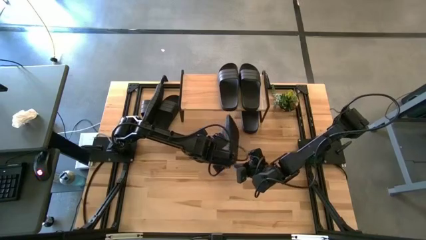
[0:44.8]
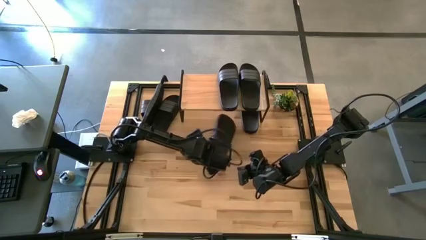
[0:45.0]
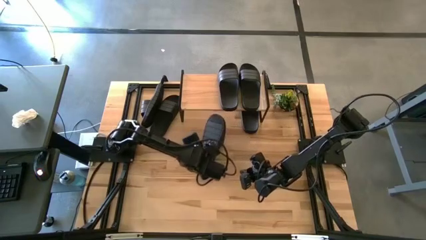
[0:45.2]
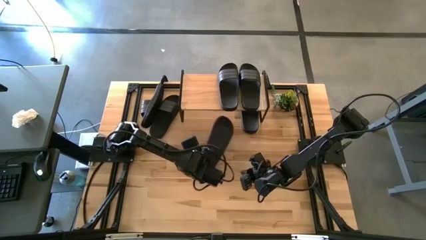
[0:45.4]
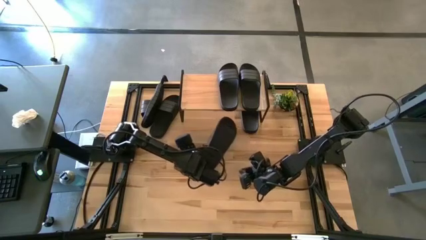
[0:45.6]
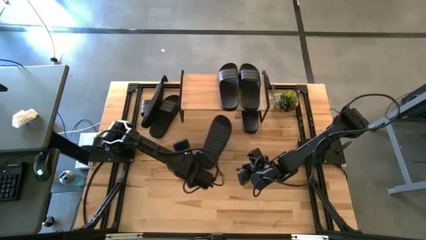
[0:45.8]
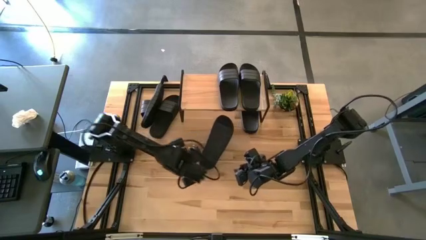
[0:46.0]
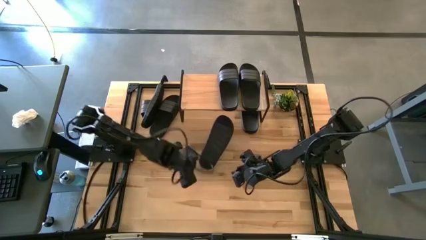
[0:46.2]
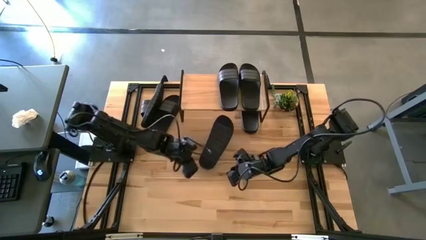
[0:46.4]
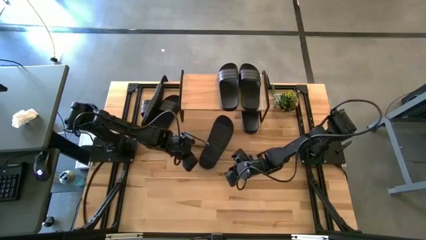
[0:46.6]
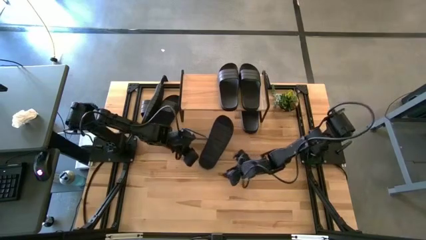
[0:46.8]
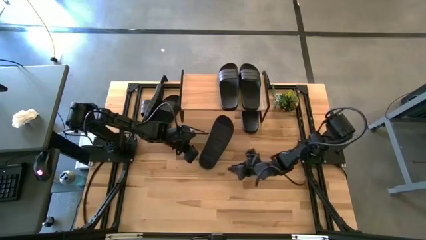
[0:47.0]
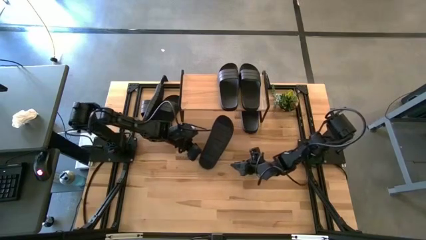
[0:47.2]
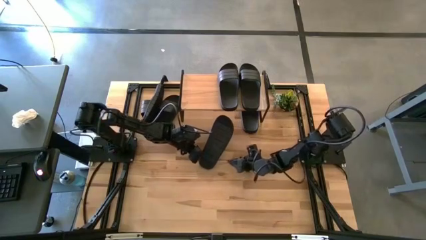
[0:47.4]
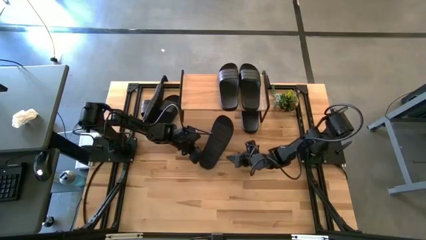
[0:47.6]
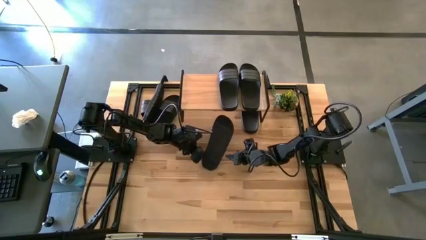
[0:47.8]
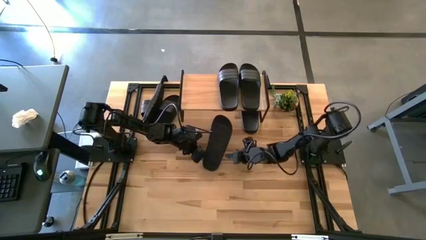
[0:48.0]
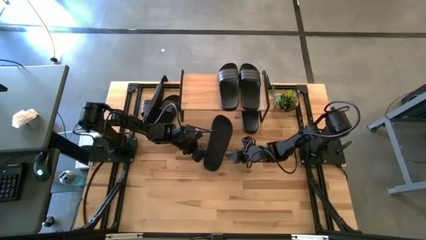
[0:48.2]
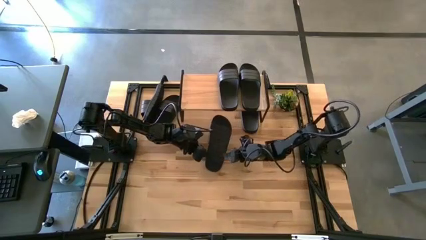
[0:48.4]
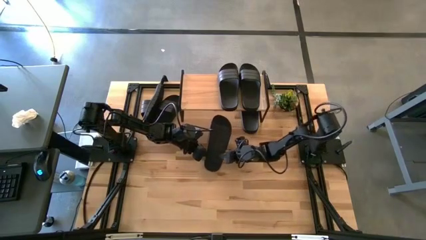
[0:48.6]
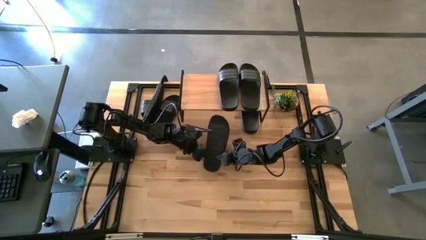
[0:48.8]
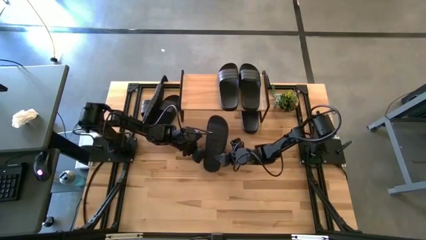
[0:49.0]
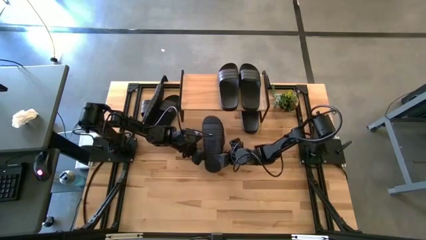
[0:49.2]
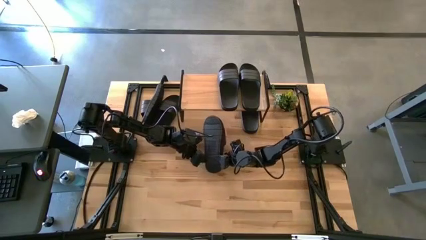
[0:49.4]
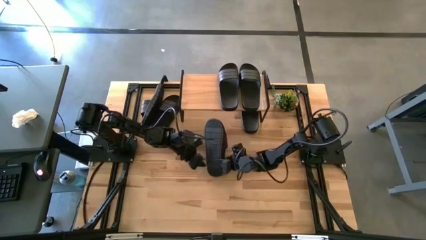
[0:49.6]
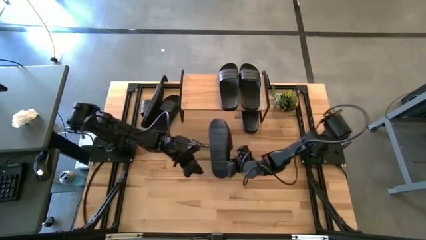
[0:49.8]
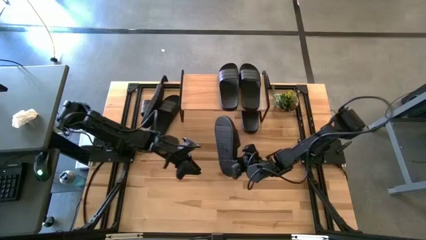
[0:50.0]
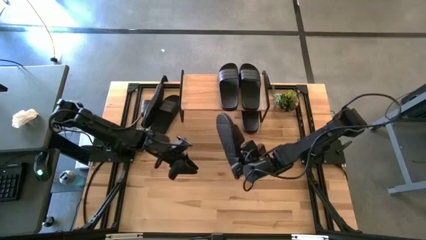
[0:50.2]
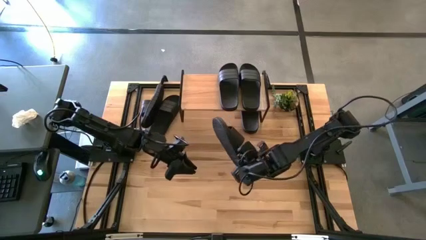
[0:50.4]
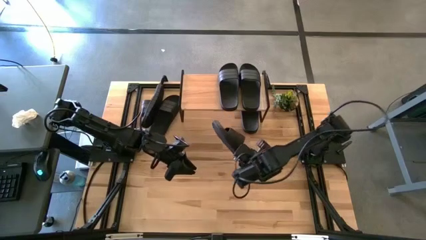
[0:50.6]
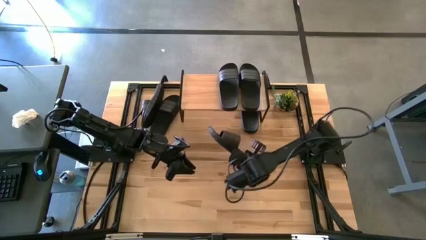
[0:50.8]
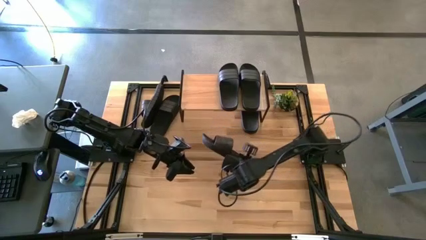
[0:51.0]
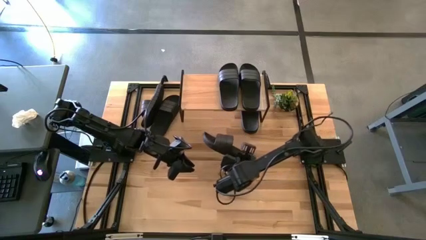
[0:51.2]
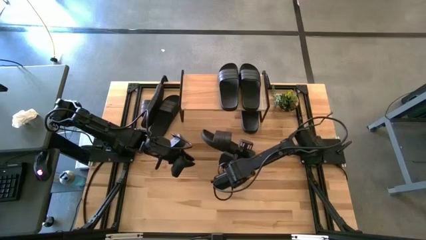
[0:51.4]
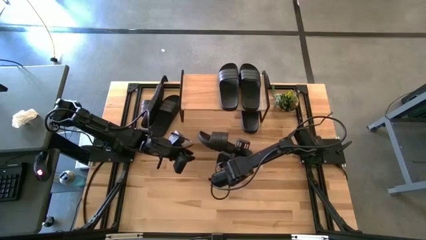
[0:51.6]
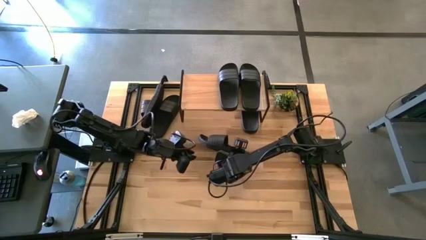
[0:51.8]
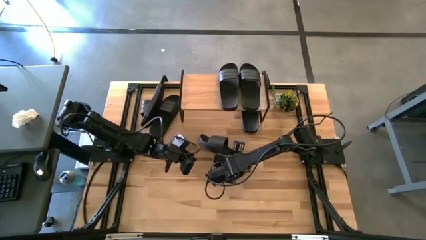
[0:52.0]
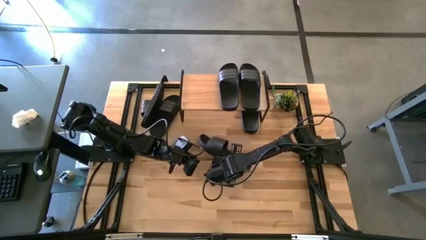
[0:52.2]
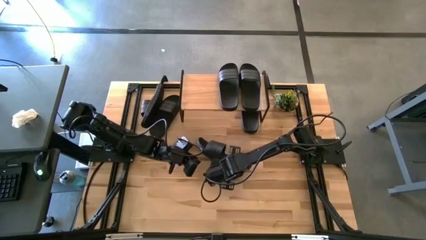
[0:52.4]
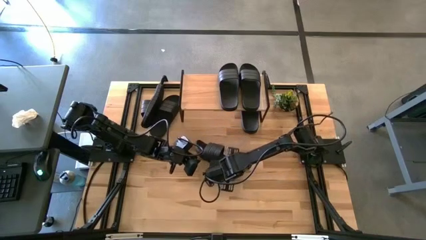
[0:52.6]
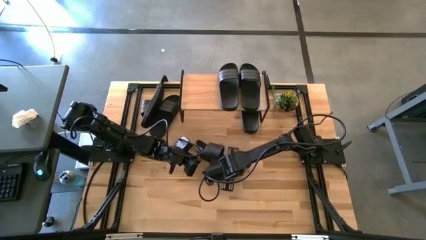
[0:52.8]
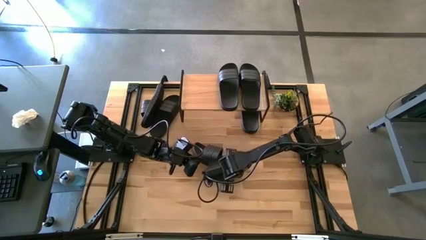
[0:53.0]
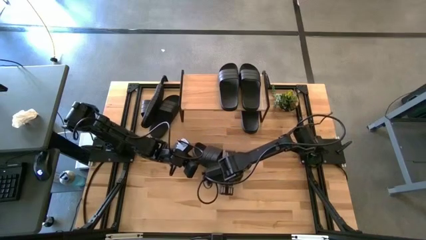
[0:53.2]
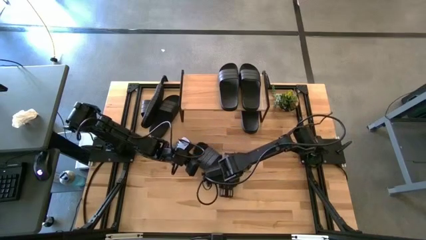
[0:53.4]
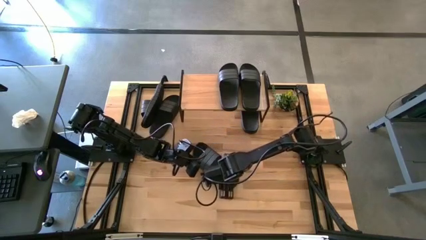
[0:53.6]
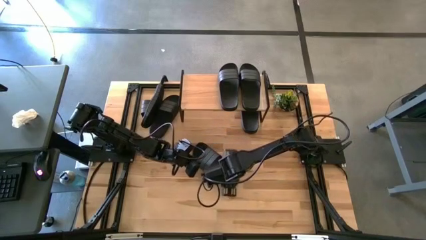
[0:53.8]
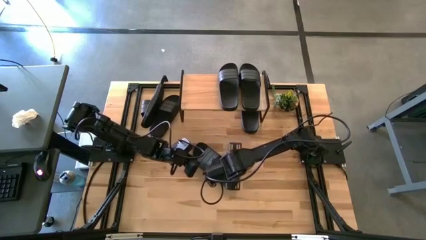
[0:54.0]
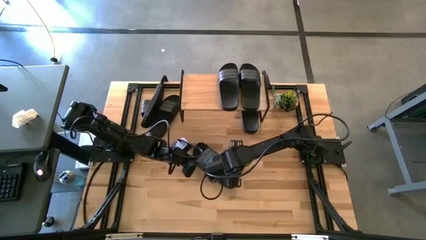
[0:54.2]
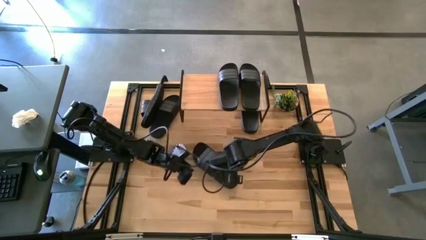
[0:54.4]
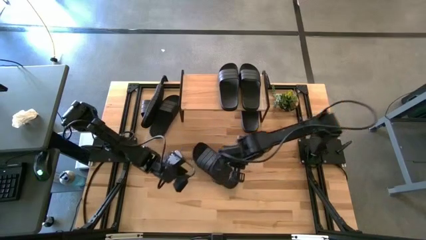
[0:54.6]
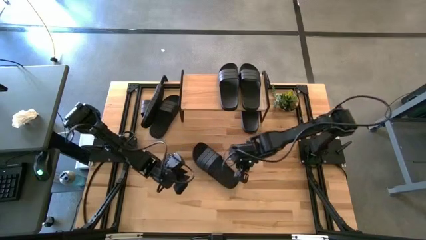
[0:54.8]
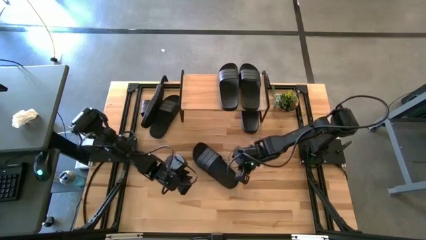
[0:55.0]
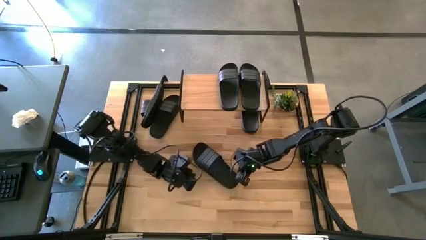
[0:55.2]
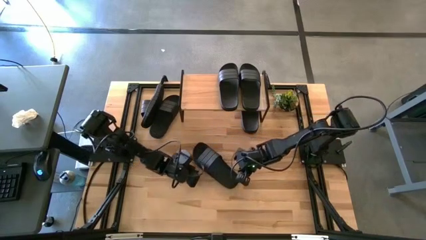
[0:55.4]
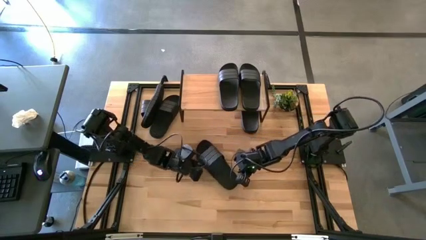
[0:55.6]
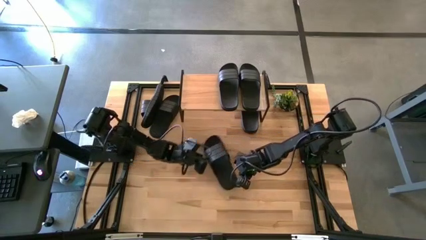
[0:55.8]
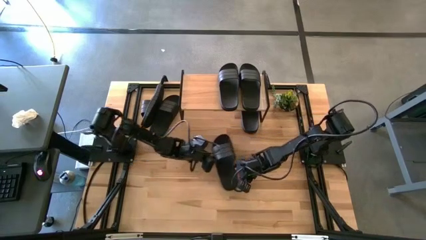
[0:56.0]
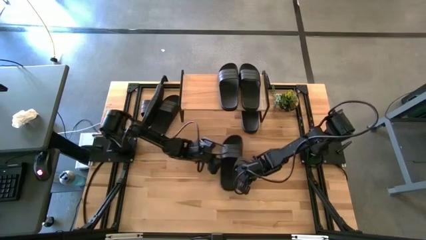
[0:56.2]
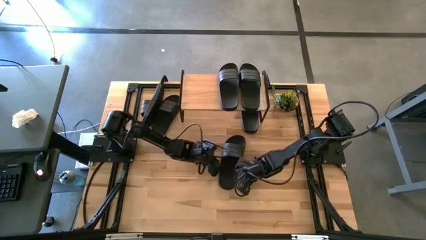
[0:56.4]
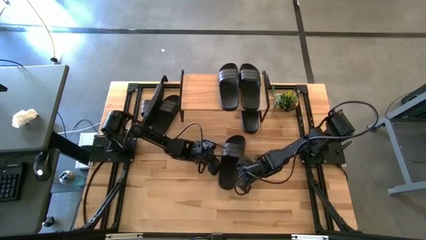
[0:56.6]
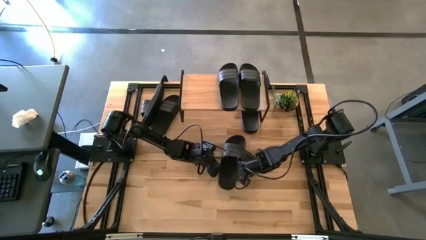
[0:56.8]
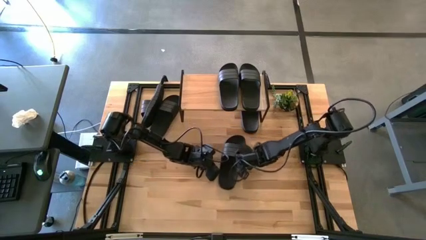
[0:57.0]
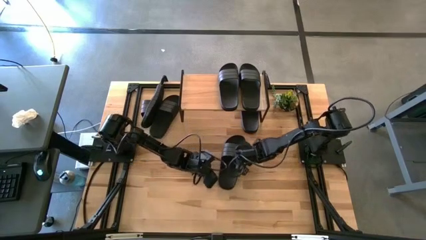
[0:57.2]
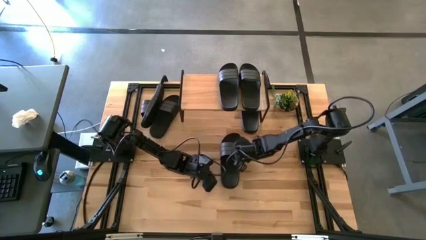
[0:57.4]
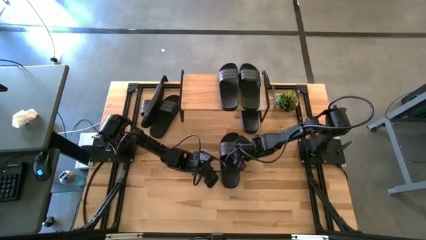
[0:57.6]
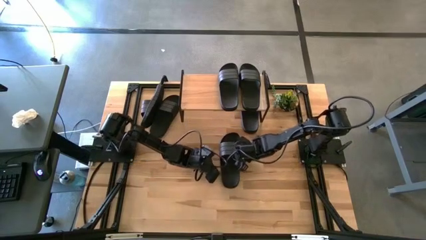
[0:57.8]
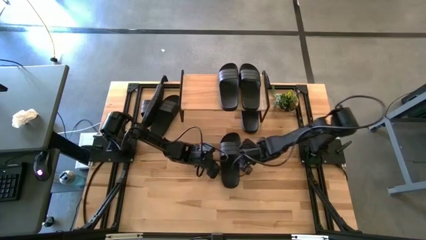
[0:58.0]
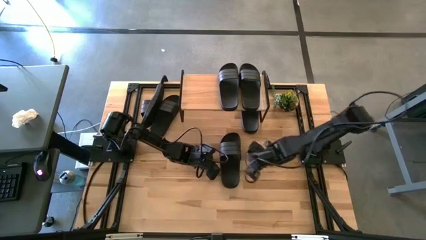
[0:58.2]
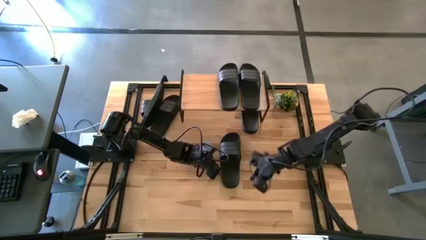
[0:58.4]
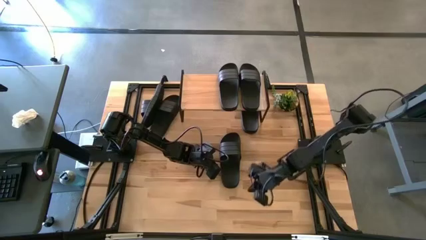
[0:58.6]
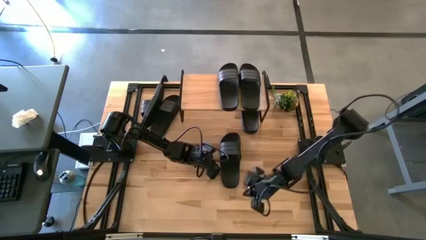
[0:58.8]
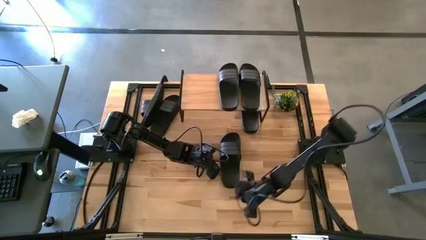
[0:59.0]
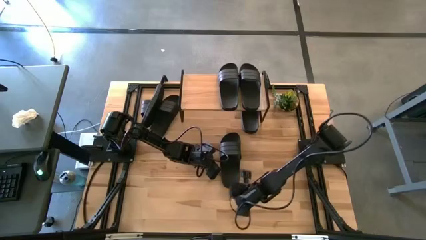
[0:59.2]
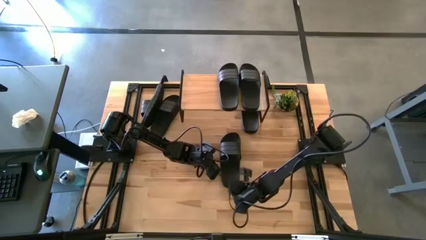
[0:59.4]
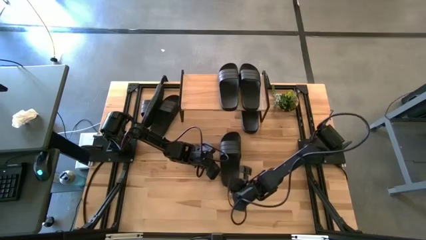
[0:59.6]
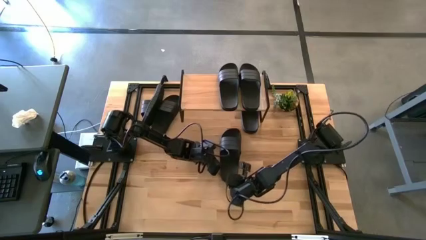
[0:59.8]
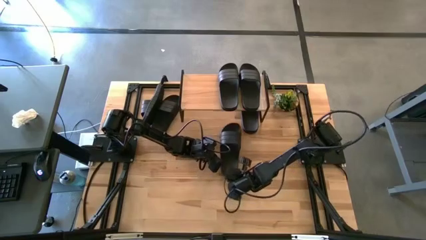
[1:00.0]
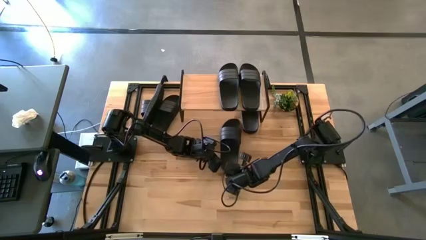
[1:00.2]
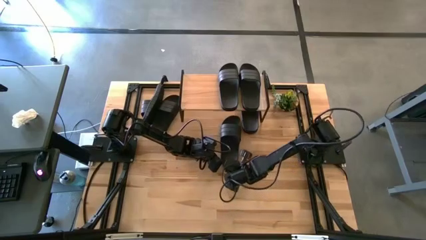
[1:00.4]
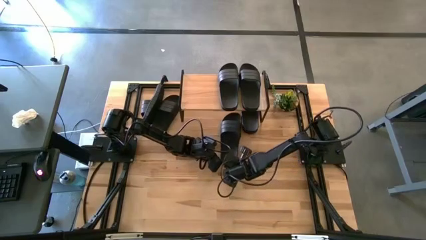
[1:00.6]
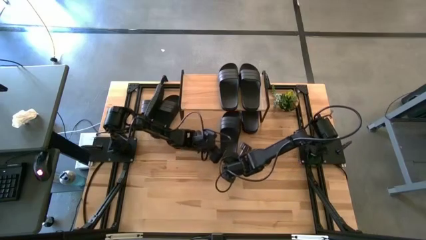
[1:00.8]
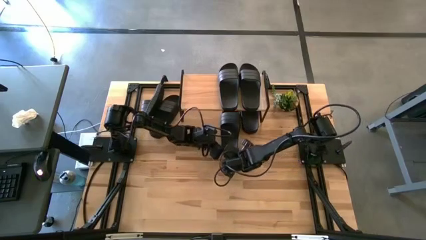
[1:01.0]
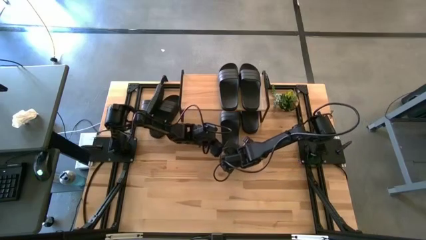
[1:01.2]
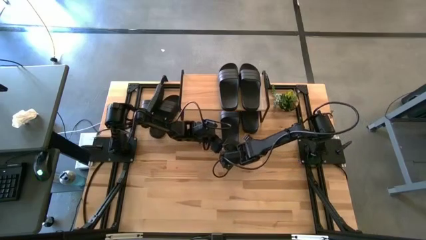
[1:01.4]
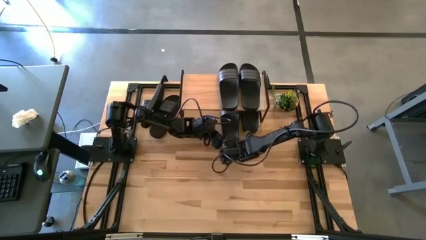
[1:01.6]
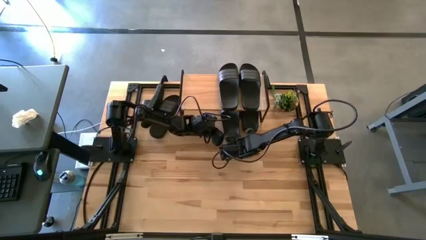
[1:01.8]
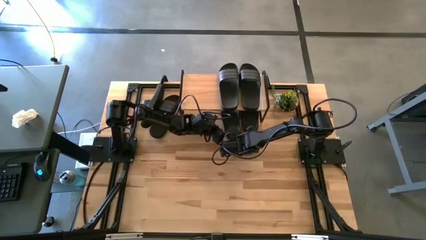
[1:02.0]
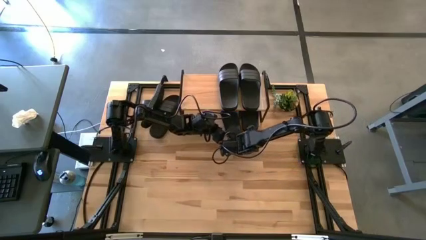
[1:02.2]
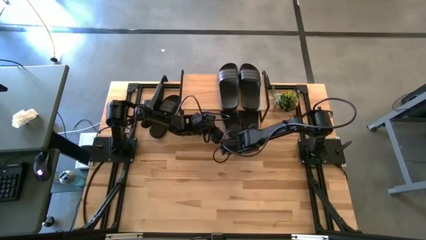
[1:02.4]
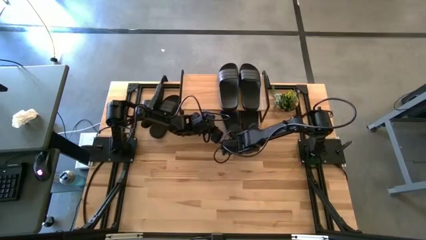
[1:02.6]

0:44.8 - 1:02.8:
Task: Pick and place slides into the shelf
Put the black slipper under the shelf
